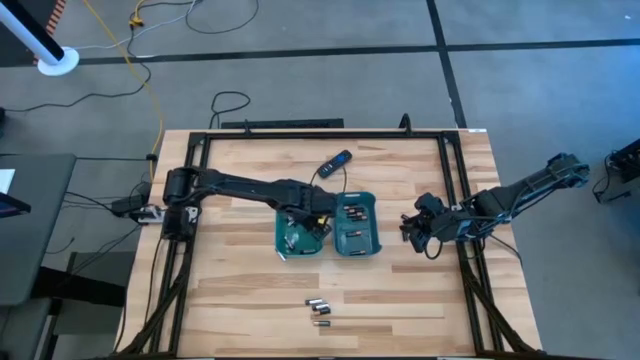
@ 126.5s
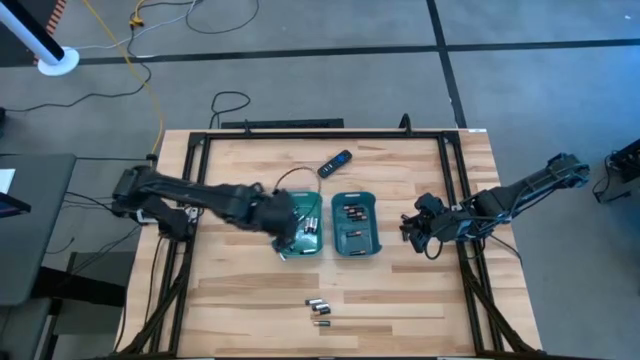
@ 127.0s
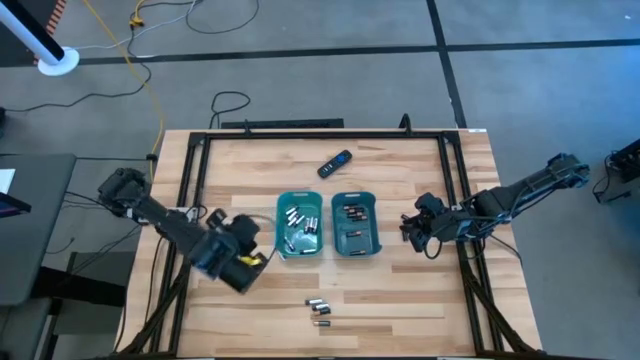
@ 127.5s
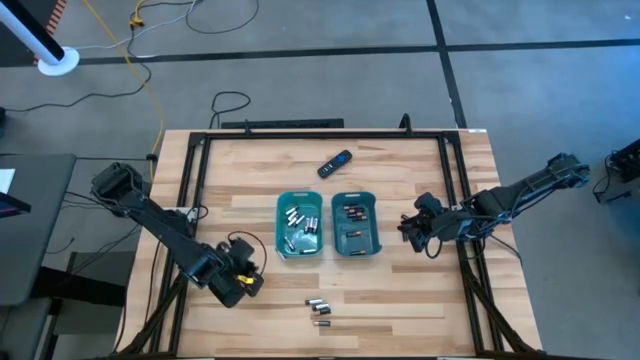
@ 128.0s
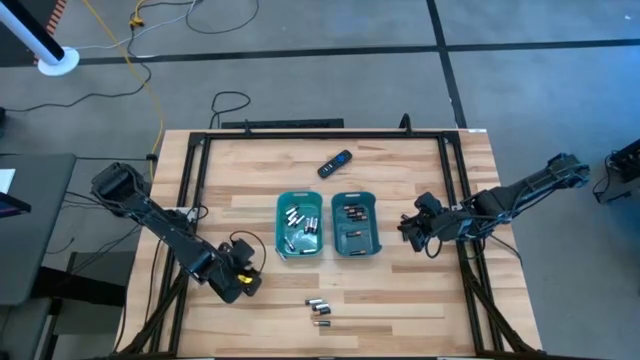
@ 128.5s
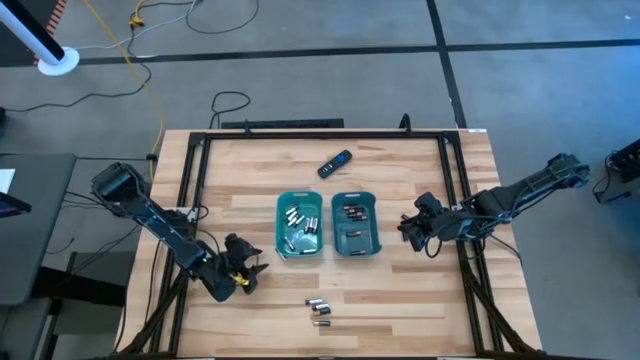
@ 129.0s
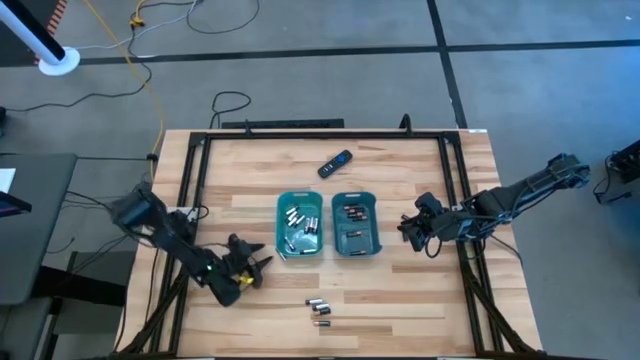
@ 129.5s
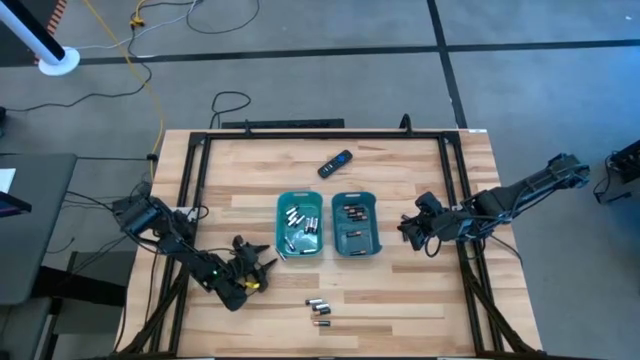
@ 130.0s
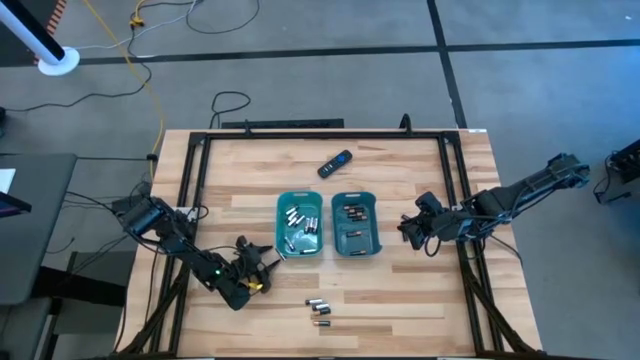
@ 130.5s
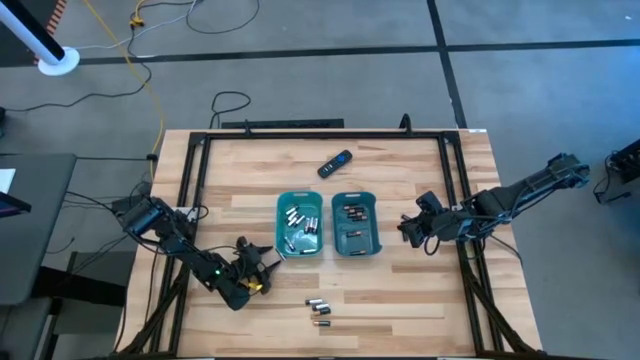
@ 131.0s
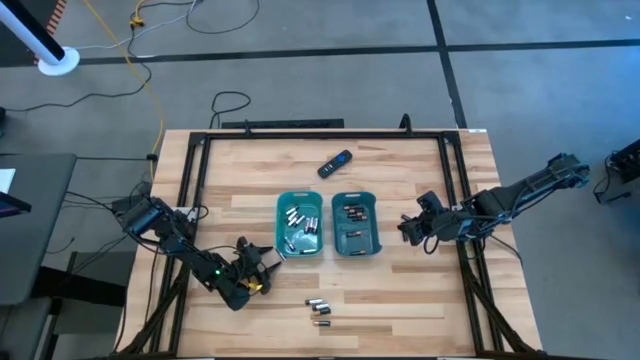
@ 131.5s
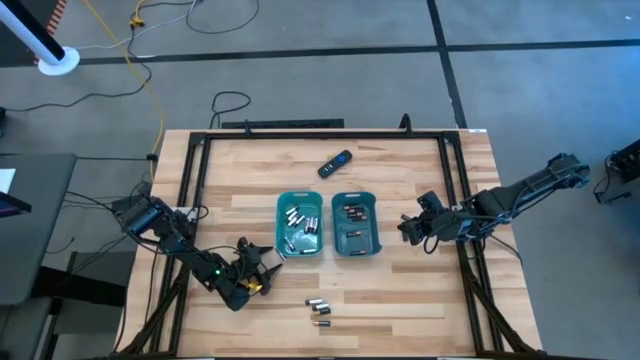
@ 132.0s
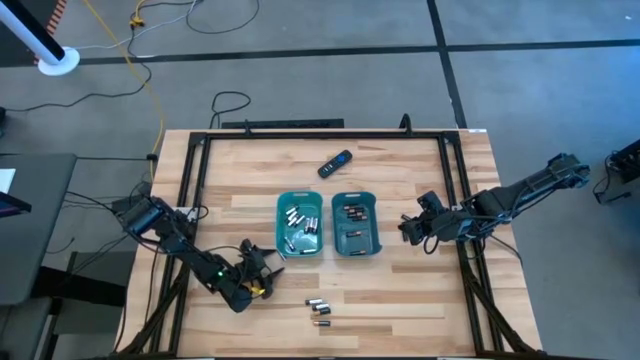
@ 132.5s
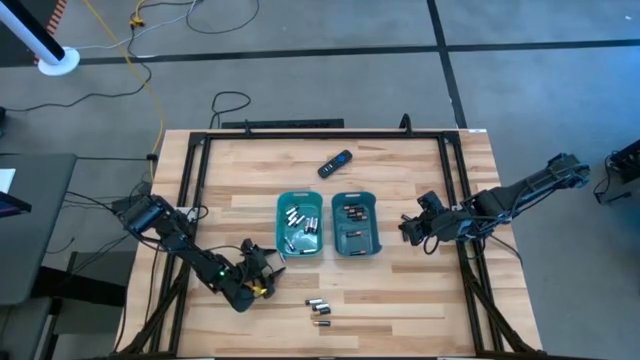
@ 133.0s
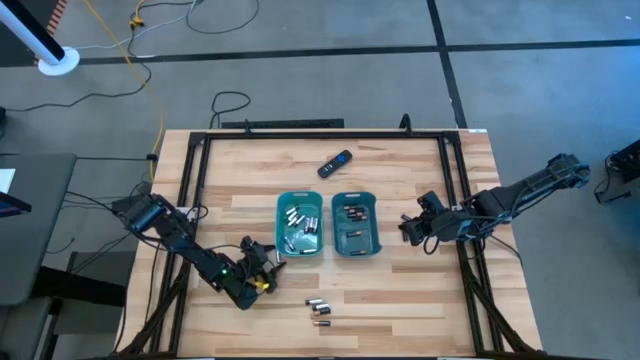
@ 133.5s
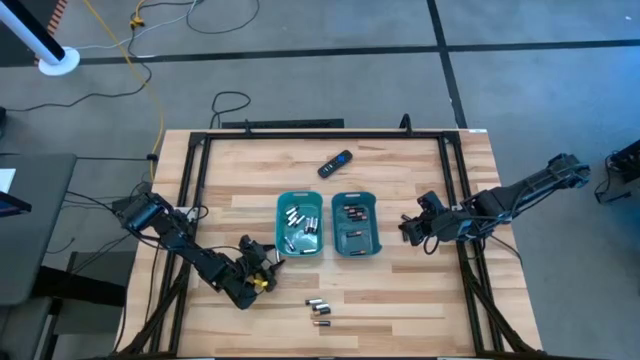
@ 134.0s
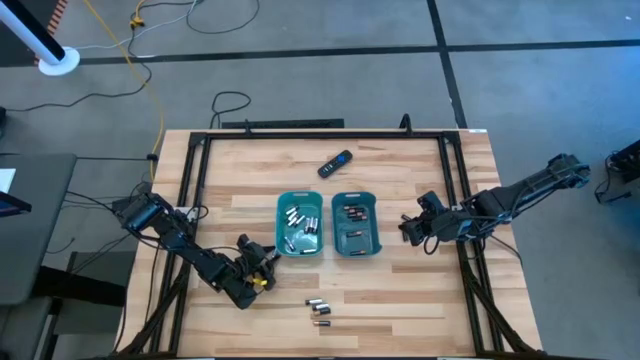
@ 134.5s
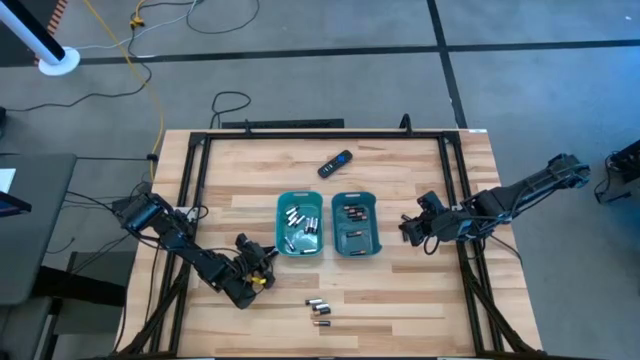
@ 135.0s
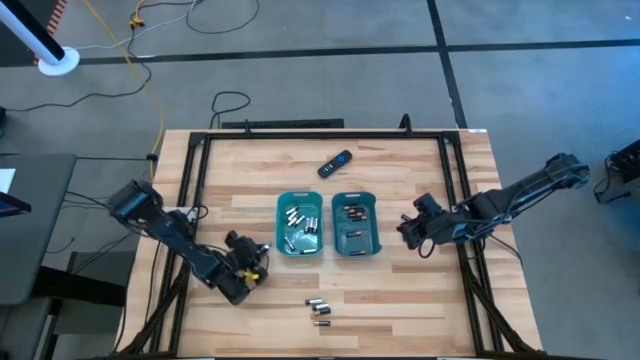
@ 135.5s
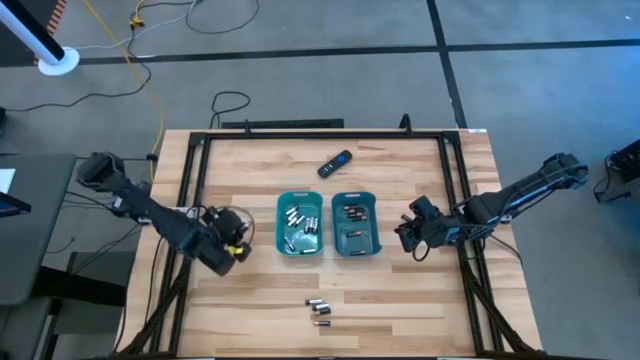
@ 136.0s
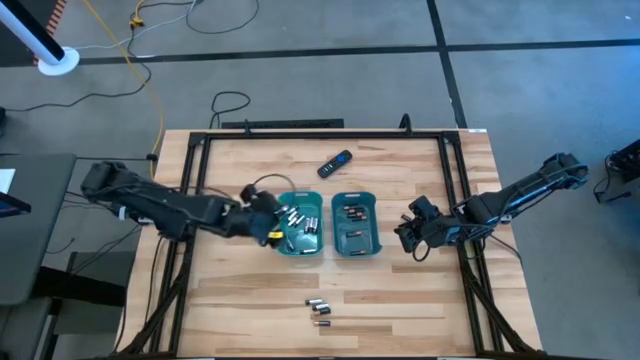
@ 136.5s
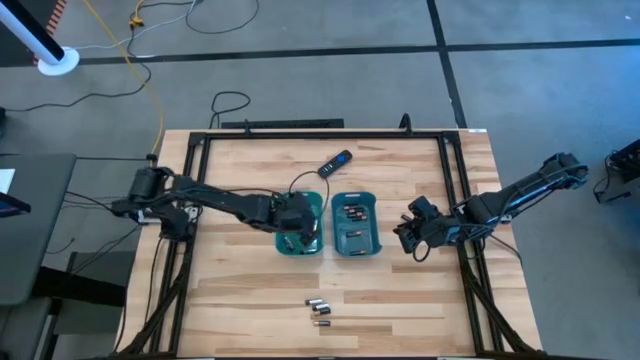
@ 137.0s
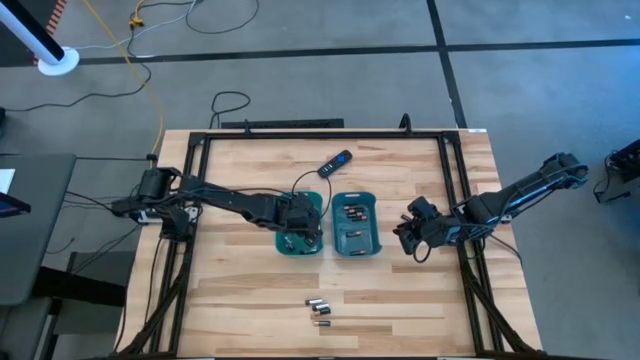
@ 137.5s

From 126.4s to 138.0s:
Task: Sort batteries
Put the silver and black battery into the green bin

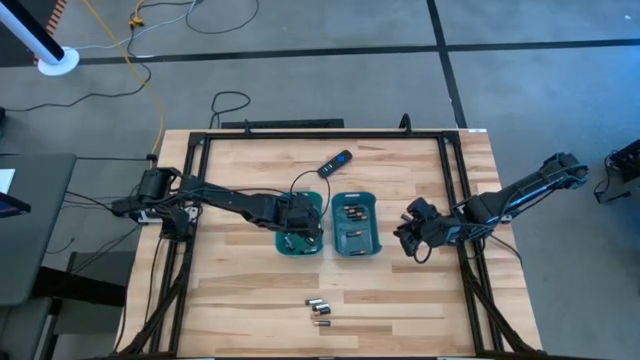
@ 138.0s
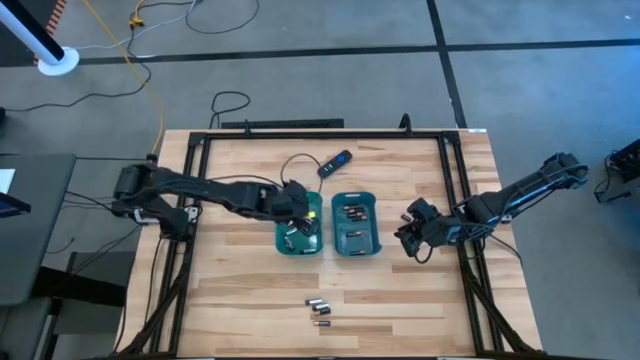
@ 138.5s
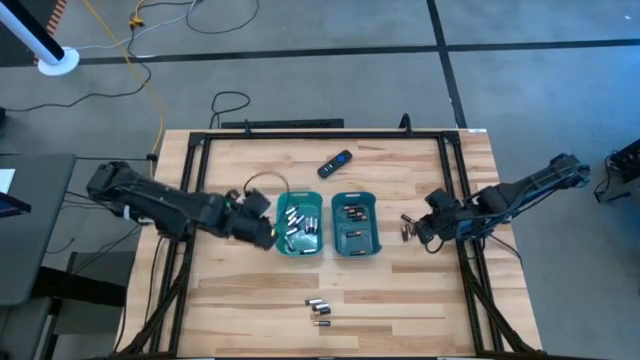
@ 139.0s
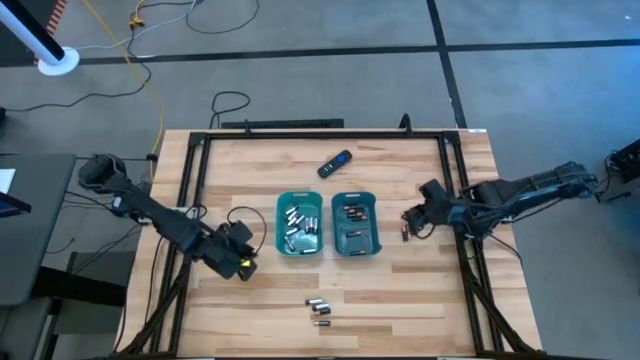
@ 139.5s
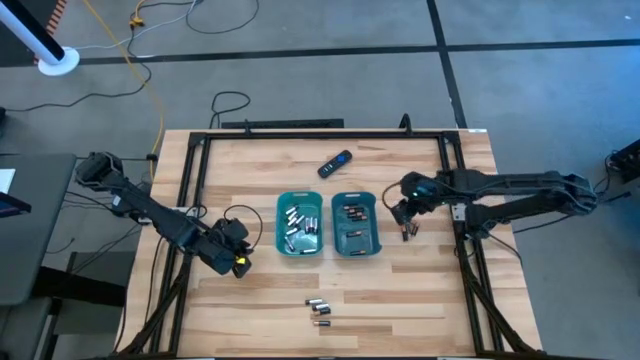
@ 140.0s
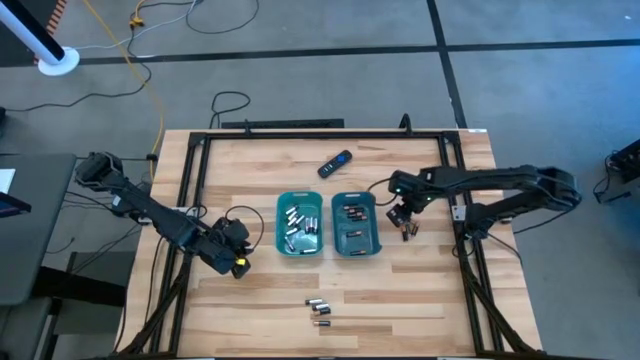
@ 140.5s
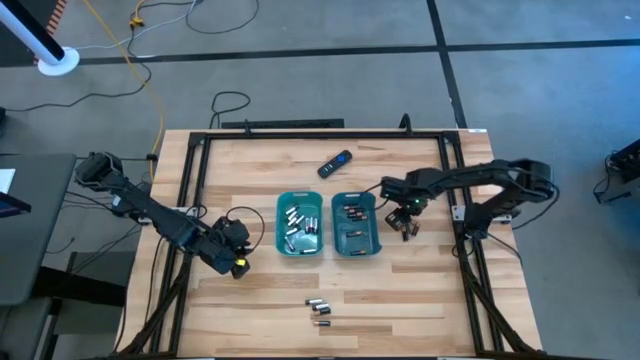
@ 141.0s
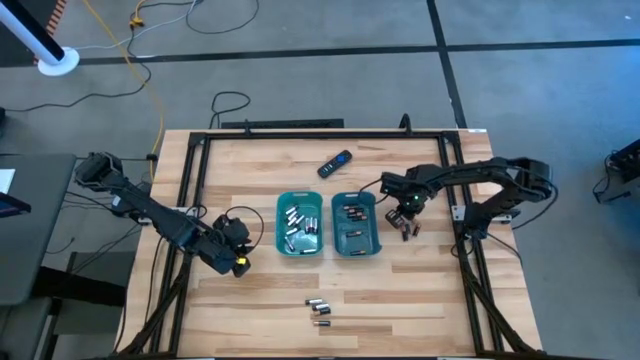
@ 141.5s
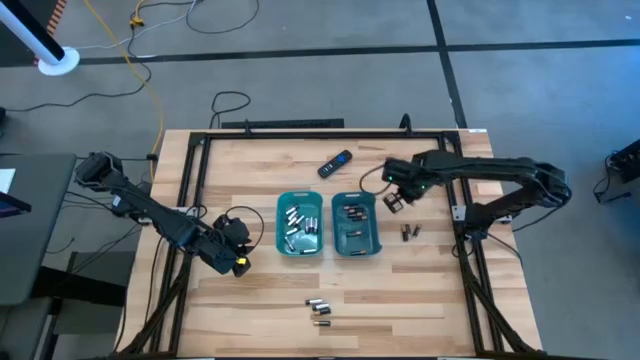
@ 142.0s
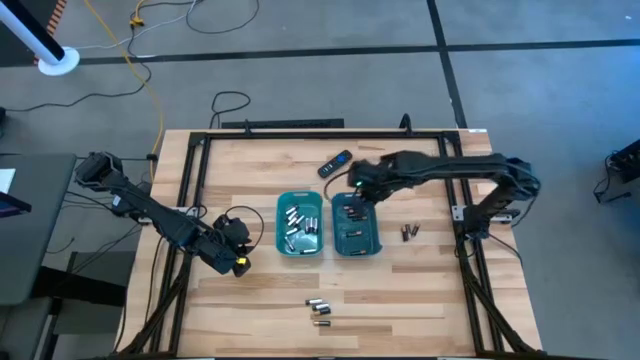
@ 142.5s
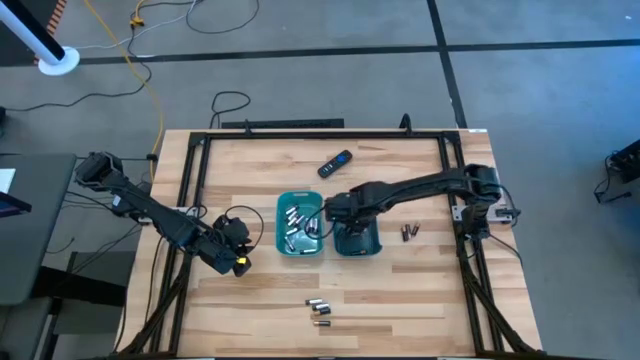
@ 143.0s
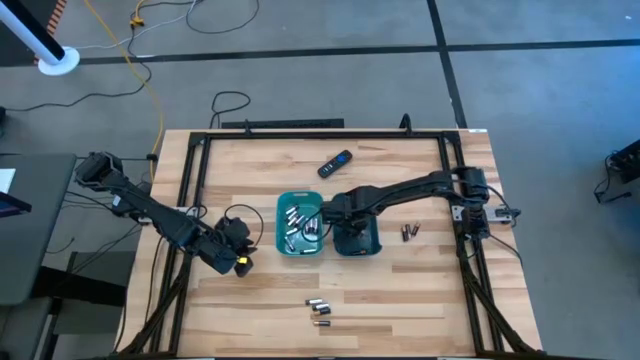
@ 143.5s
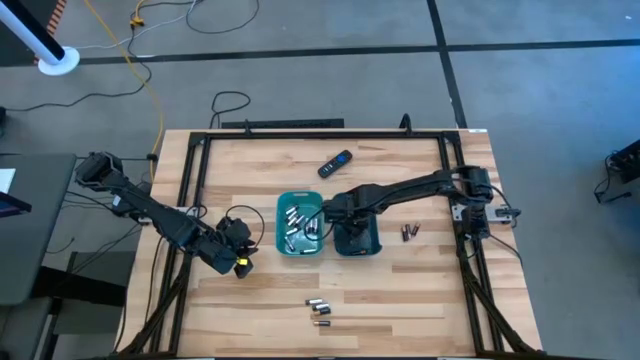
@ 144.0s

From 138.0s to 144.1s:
Put the copper and black battery into the blue bin

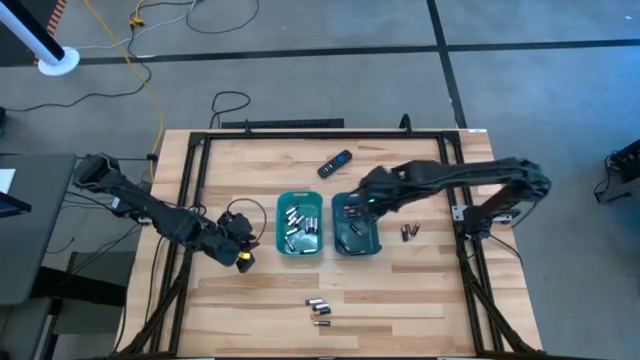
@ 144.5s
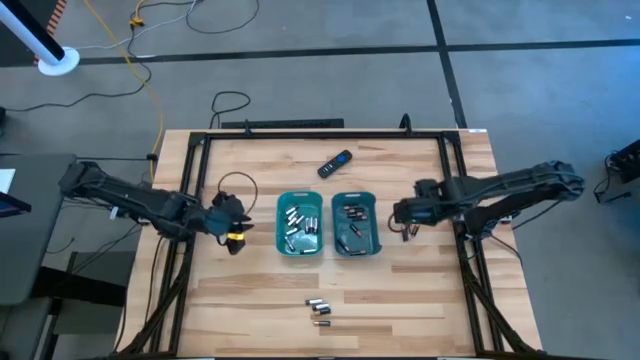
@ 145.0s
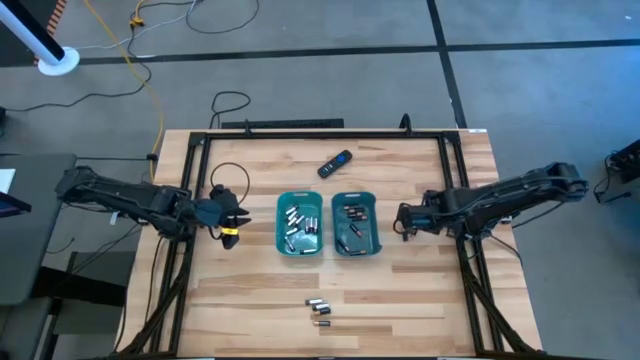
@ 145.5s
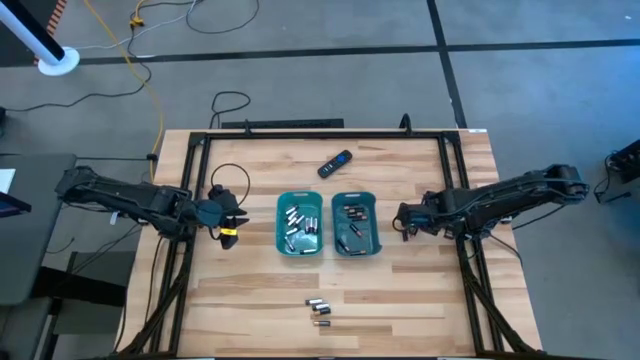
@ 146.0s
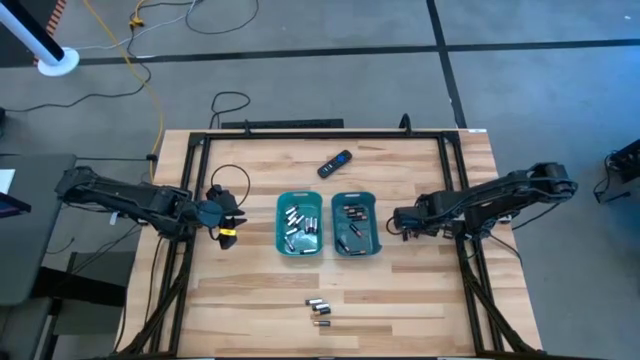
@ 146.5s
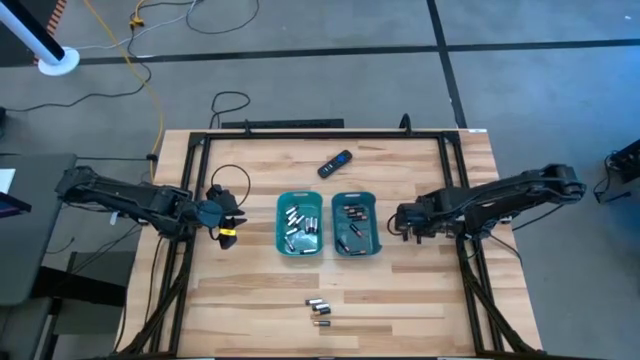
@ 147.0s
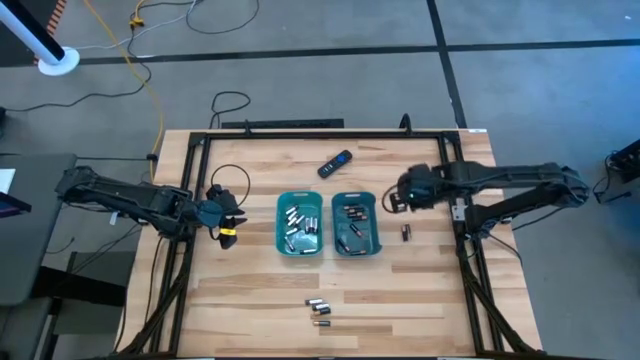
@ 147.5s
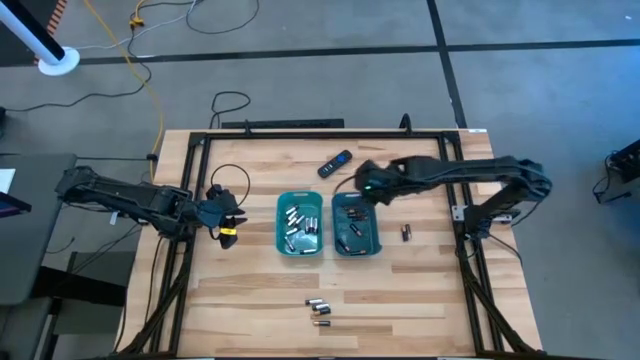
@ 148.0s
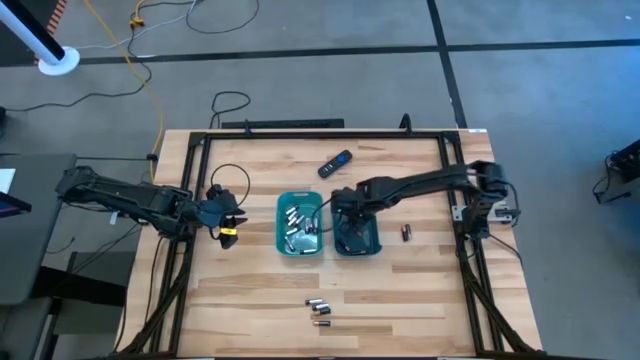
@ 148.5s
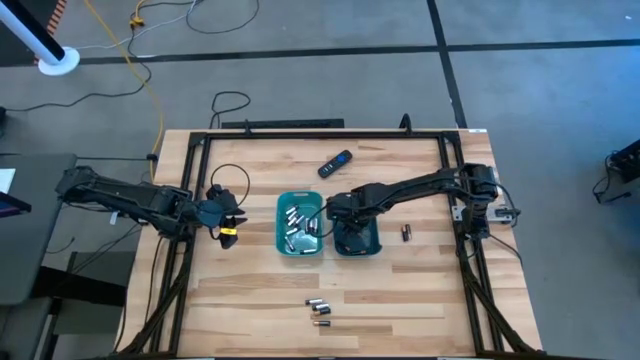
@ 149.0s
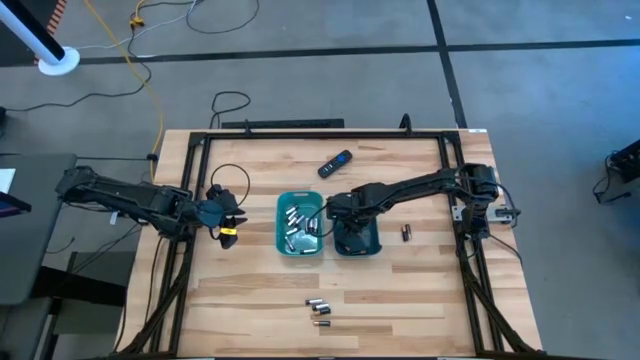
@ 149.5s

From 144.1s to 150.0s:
Put the copper and black battery into the blue bin
